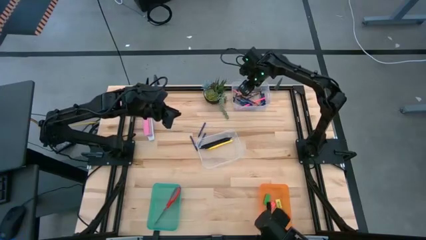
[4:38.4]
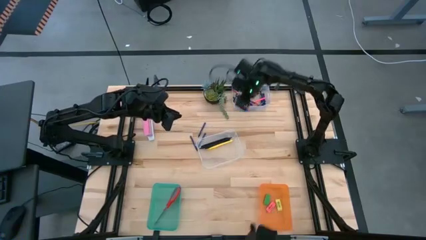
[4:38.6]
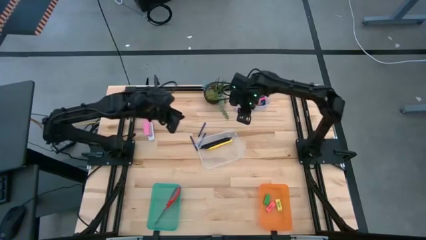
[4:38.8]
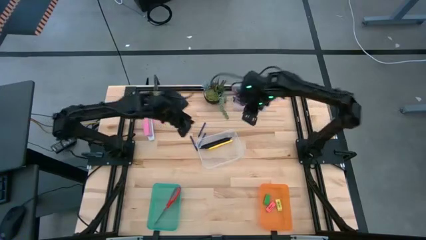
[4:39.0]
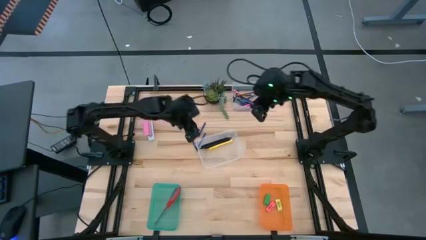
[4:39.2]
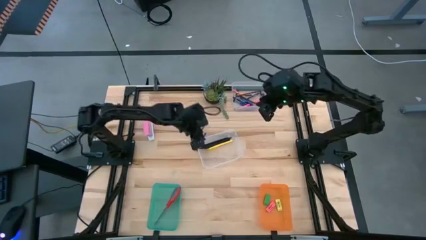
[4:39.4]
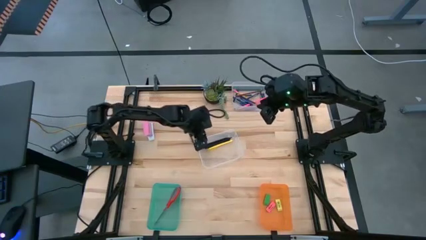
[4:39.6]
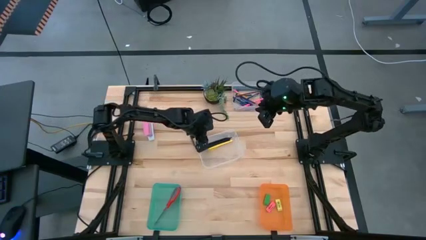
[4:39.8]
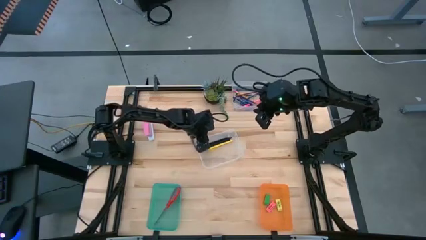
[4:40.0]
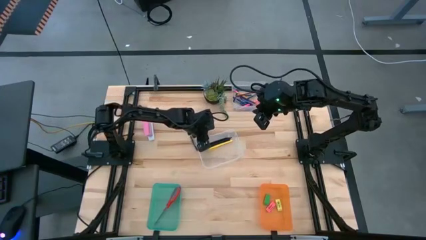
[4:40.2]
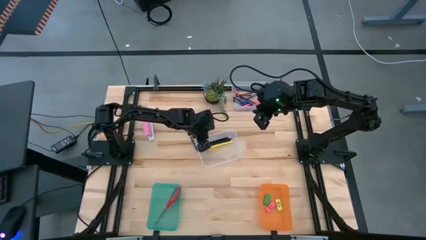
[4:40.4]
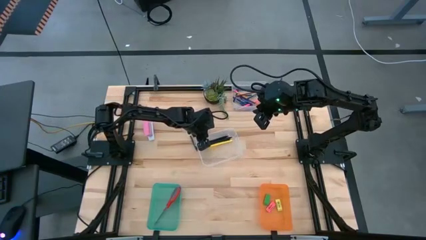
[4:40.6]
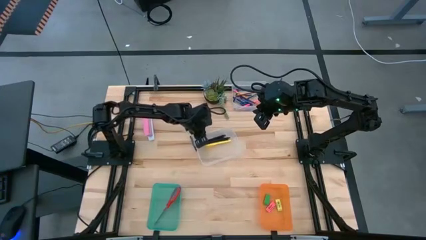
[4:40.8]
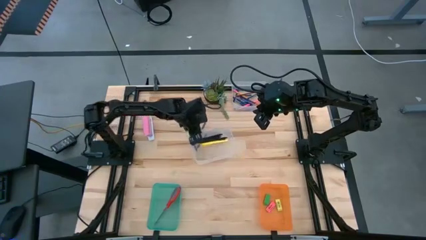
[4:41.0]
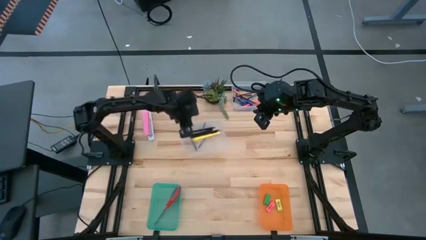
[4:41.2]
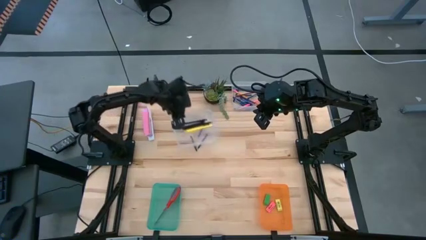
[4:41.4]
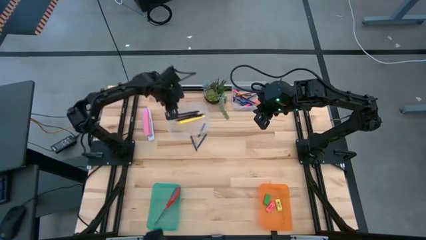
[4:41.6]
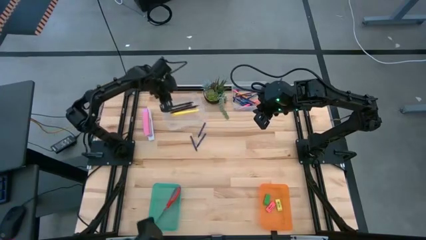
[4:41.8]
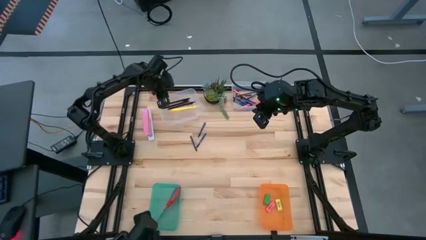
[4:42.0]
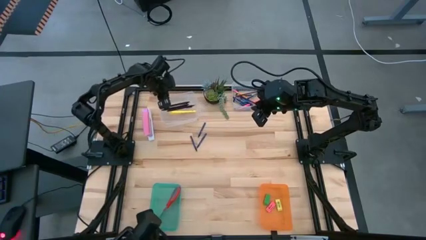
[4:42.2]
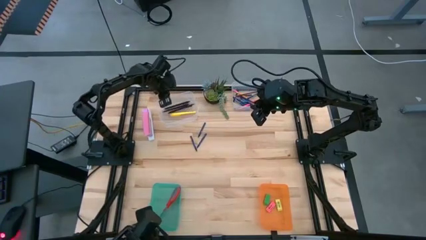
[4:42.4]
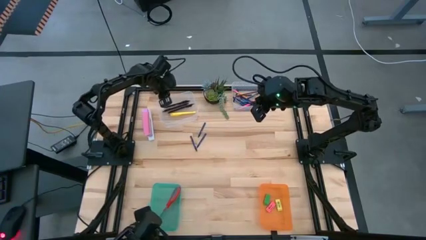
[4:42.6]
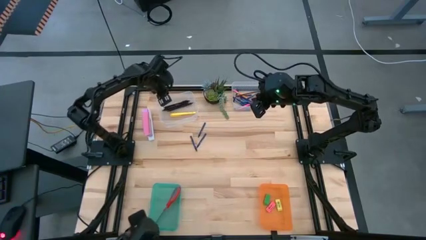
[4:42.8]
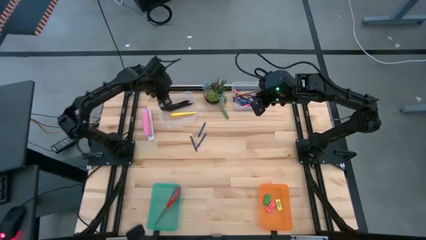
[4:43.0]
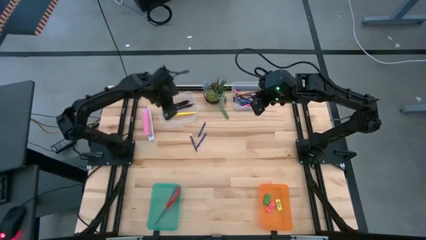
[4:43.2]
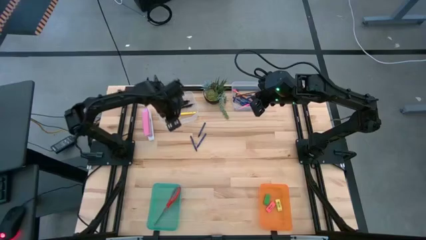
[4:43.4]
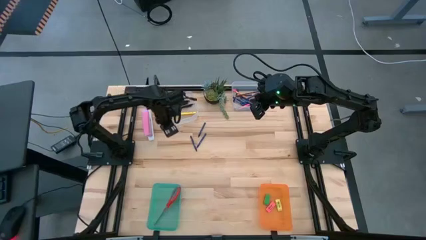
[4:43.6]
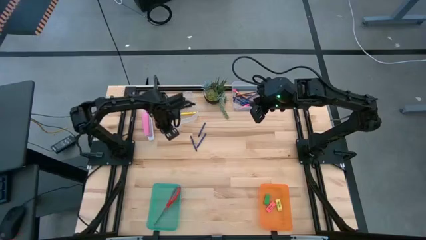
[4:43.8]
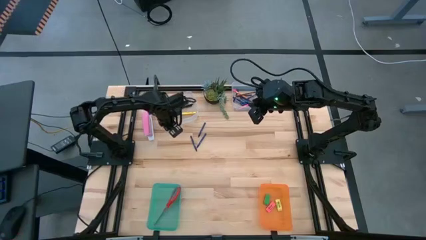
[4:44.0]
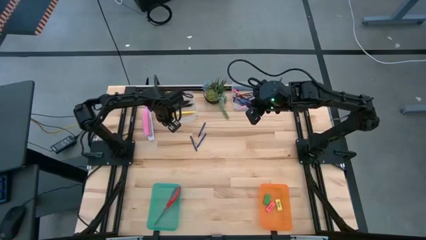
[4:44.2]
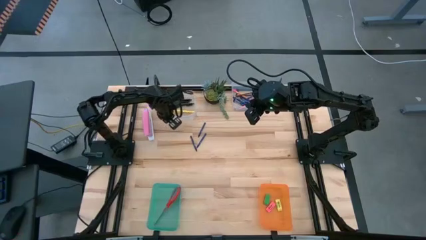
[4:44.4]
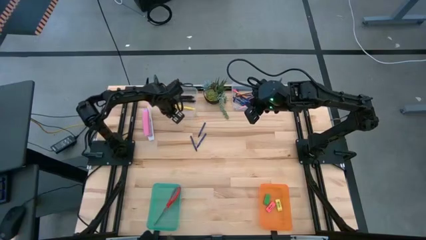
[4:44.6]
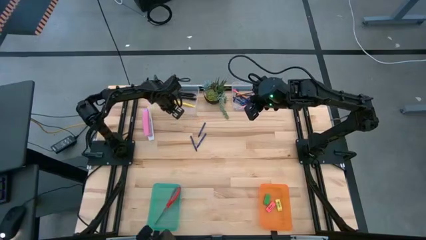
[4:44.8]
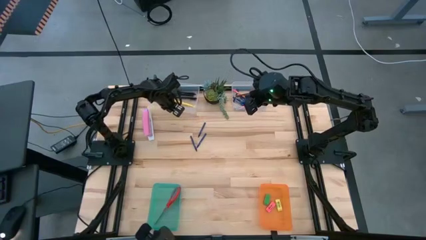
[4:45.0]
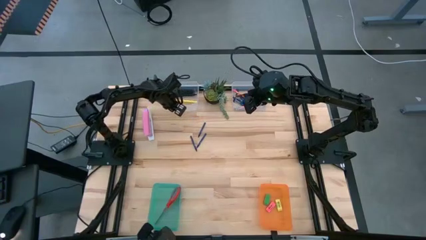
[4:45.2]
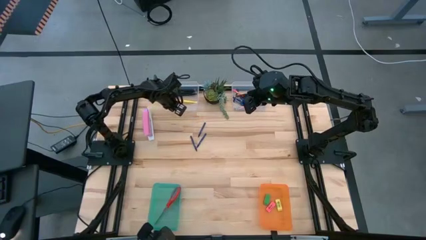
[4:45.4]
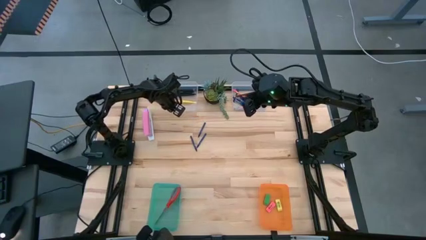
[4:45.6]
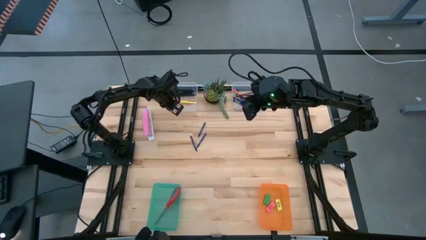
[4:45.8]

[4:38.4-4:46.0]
Task: Sort crayons/erasers/pens/pencils in bins
Move the center transparent bin on the top left of the table

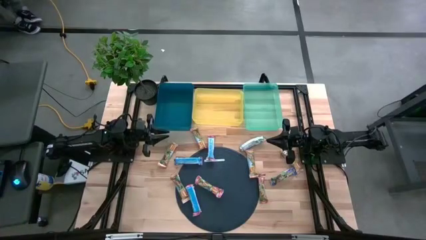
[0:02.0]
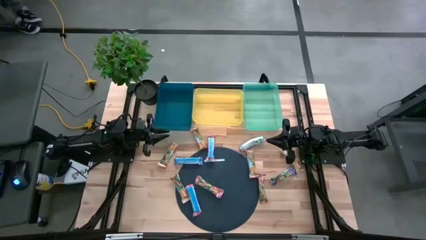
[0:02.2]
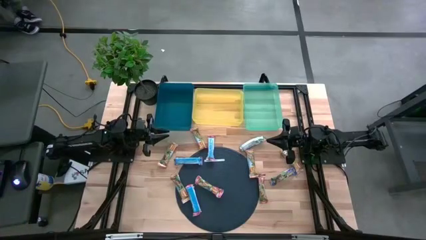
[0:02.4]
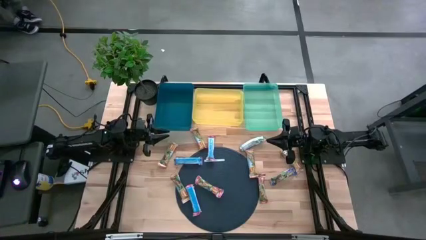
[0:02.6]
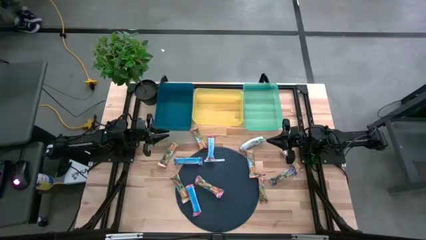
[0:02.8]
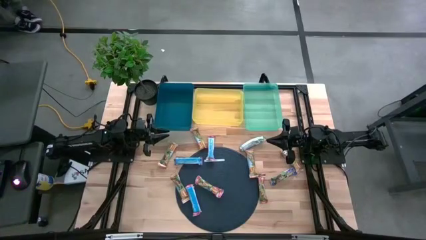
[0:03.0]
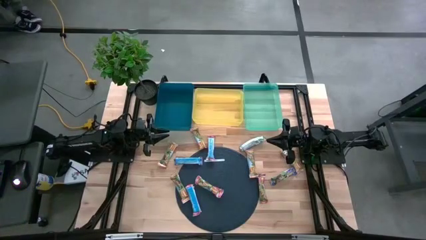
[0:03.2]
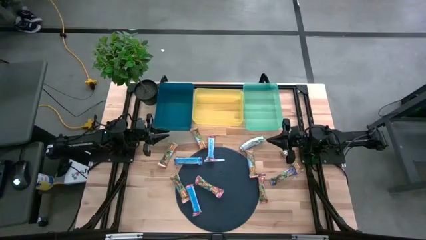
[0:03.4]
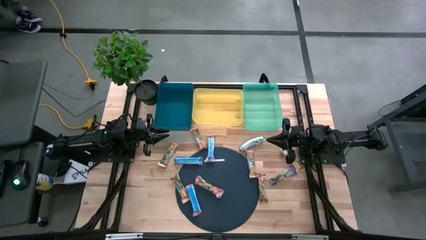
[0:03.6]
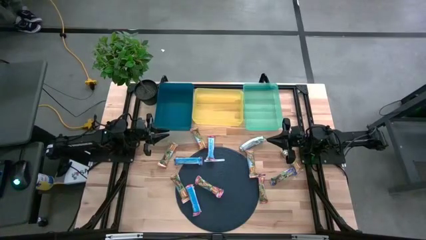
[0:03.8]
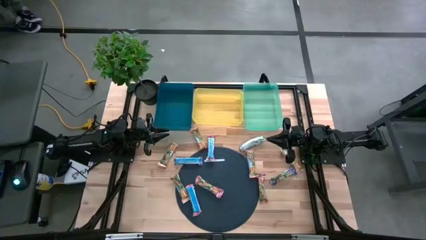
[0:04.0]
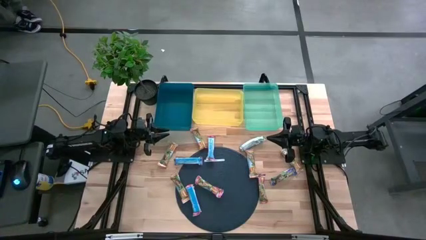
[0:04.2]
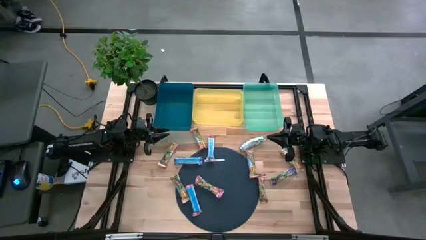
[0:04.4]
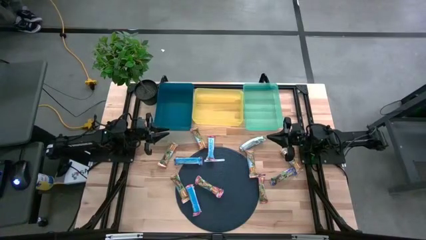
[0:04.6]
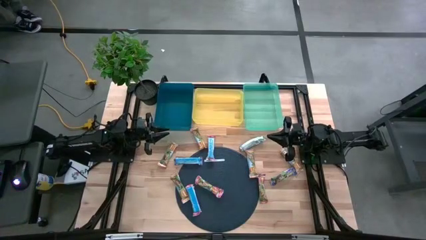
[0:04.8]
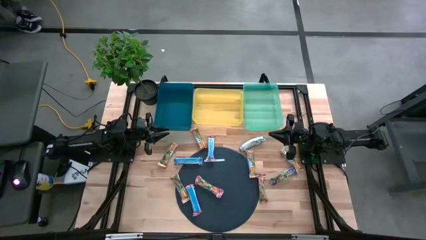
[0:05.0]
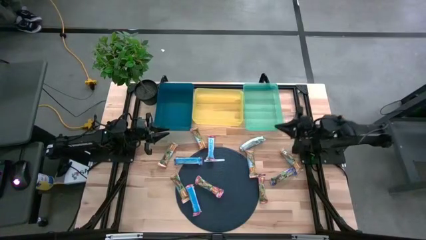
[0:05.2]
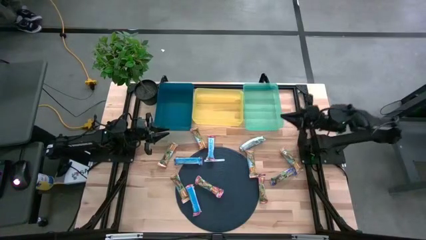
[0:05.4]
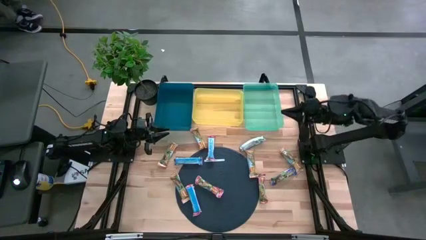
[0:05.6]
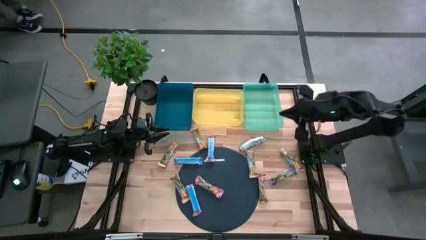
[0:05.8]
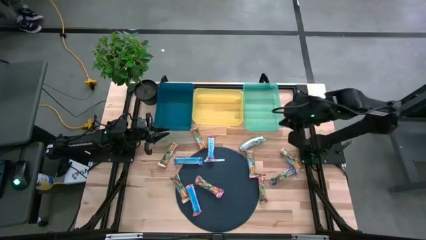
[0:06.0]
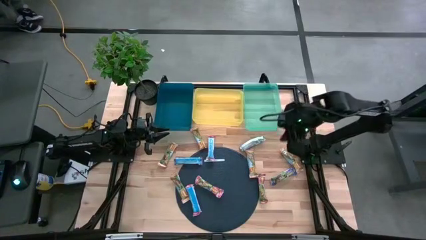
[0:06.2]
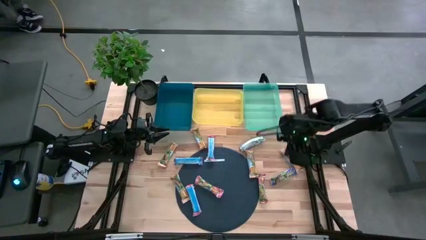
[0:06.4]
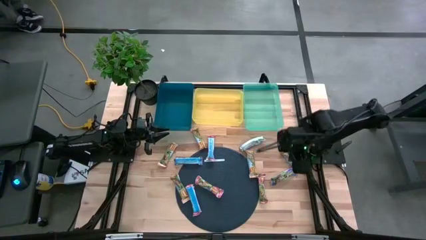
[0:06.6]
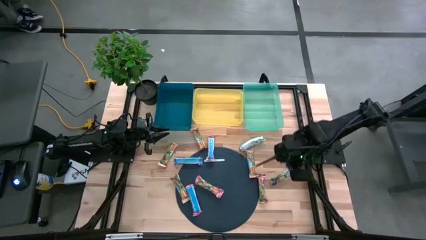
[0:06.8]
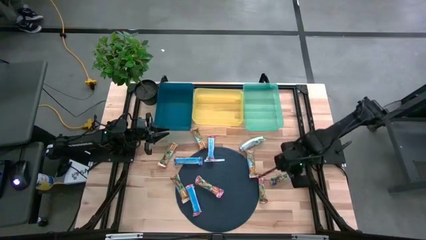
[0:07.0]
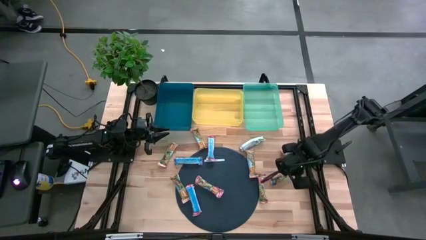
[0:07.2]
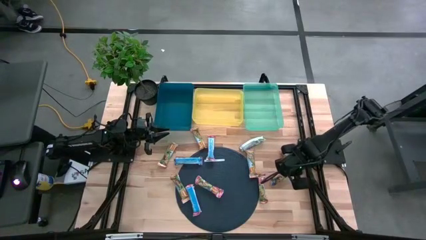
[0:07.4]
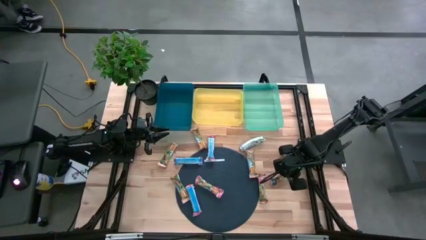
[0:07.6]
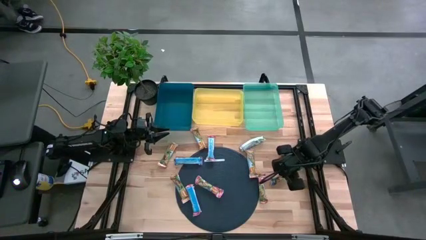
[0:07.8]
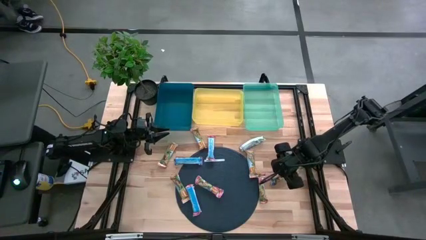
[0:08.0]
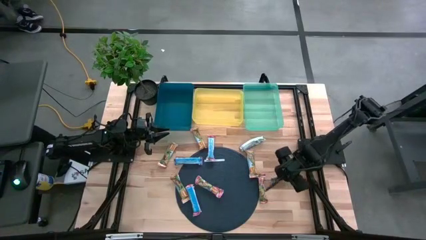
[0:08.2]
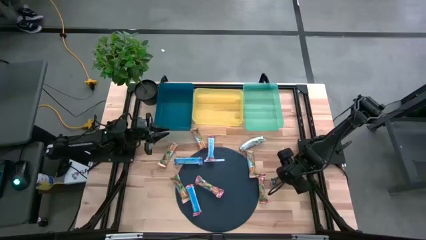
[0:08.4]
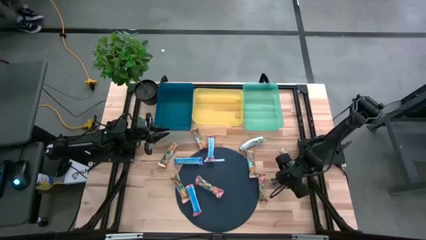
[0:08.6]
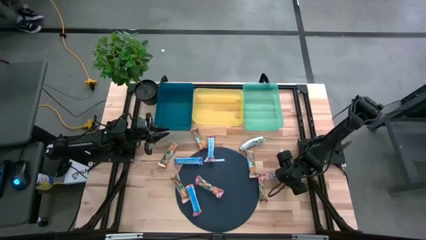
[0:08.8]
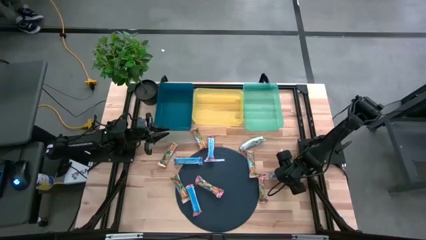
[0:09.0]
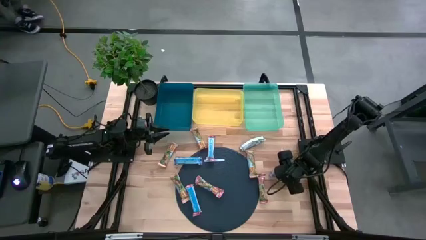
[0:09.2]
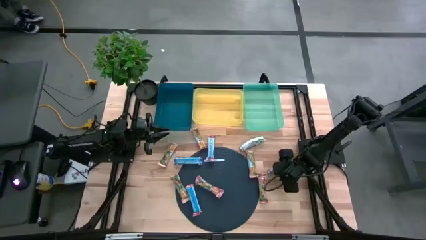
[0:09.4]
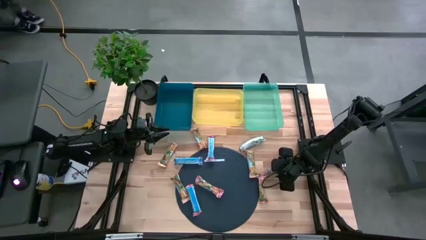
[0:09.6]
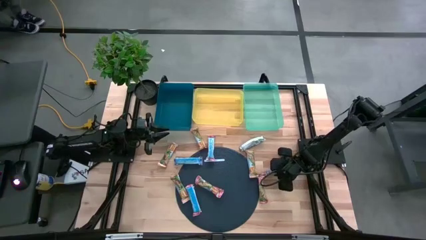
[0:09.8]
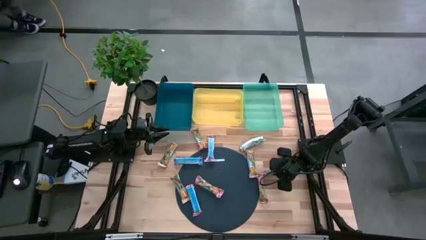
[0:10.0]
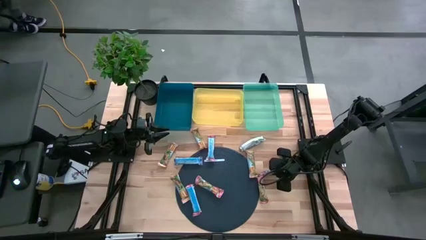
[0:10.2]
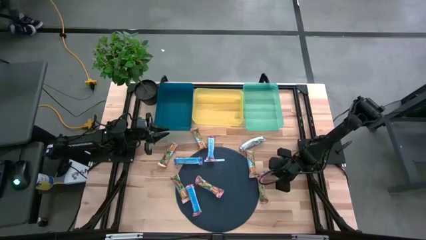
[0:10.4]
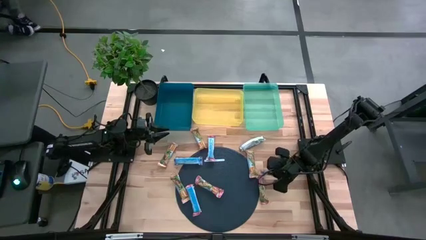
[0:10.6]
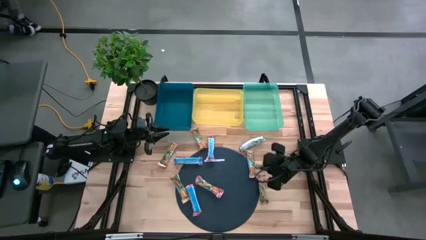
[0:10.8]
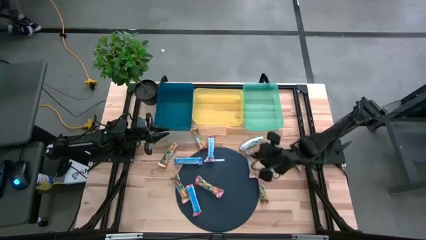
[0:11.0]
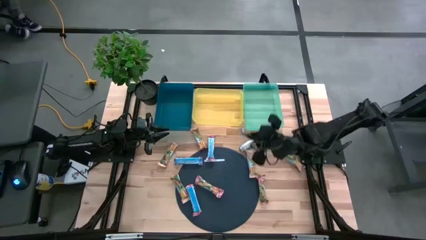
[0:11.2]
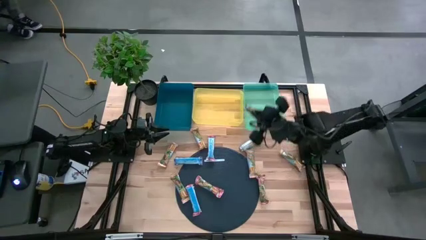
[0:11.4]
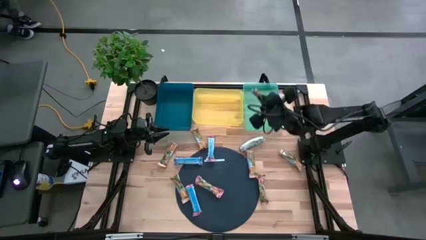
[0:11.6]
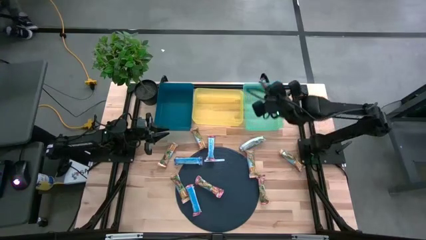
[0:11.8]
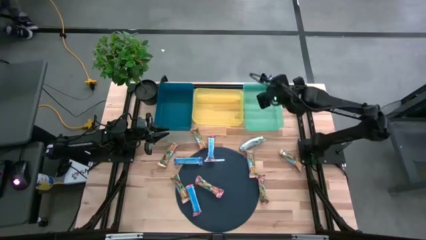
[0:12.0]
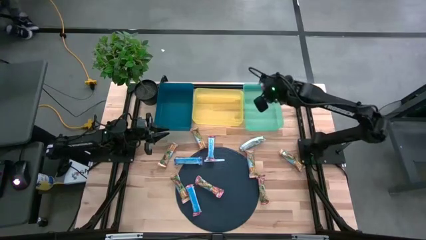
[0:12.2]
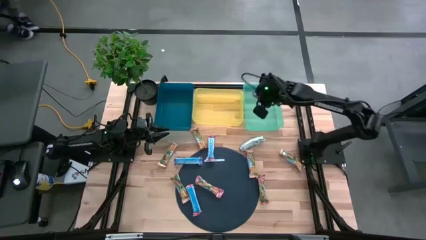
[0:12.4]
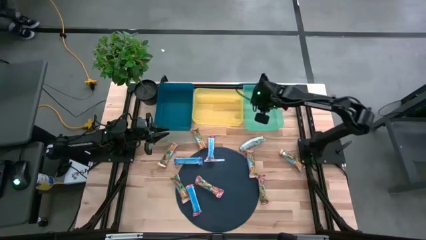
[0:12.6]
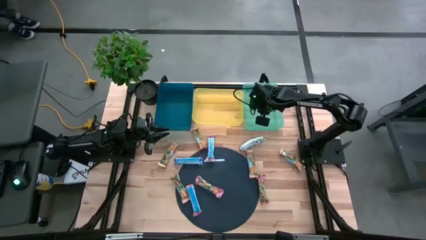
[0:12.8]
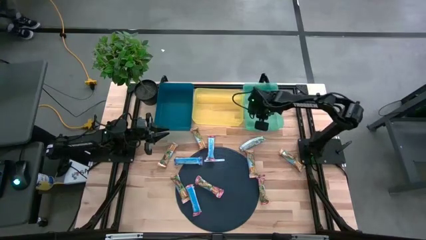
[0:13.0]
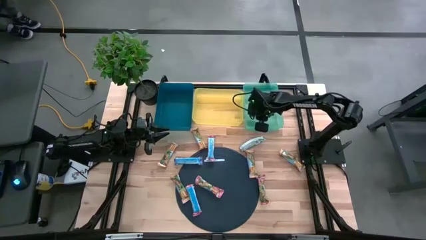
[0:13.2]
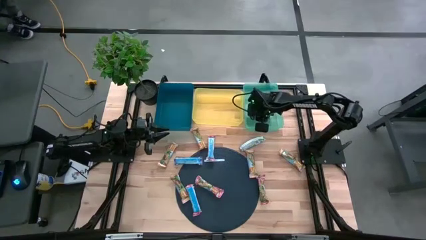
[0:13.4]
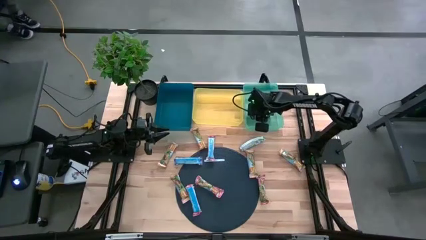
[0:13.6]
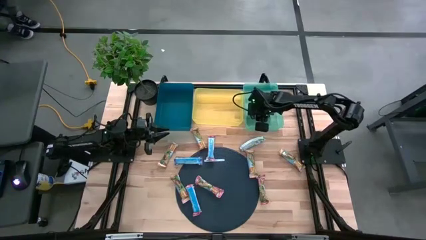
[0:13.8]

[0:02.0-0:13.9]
Task: Pick and place Granola Bars by type
Put the violet granola bar into the green bin
